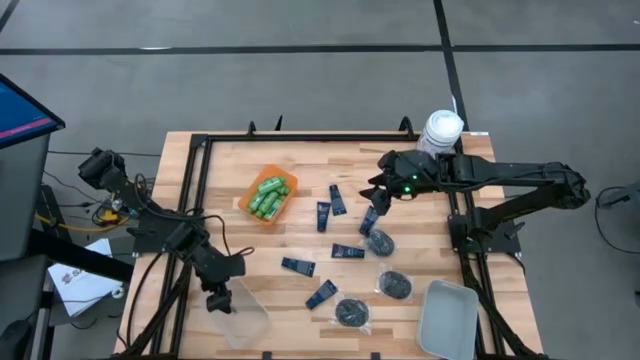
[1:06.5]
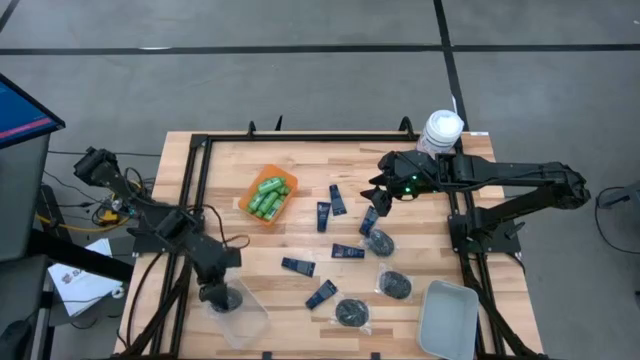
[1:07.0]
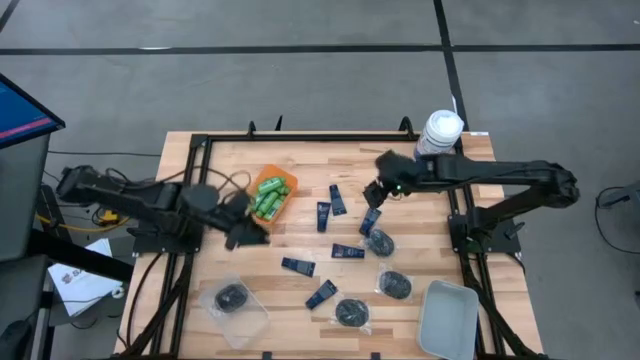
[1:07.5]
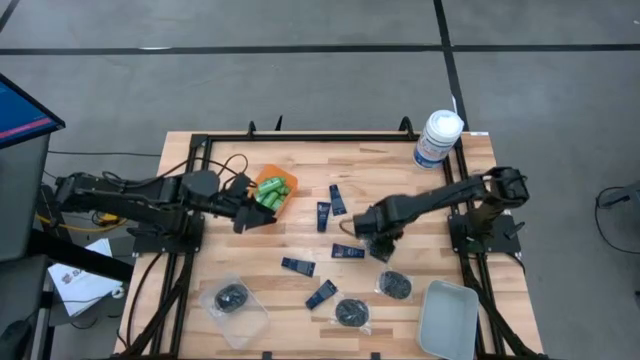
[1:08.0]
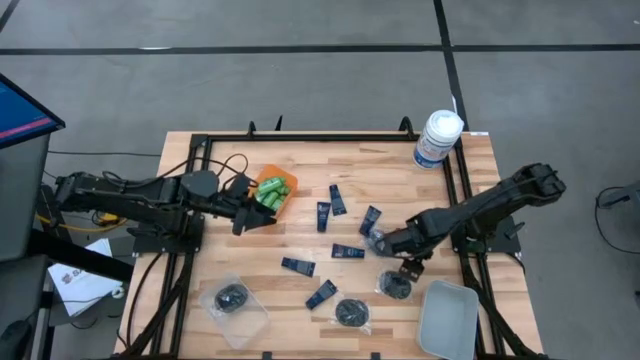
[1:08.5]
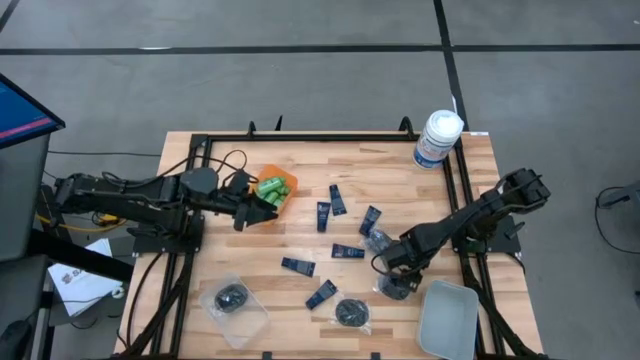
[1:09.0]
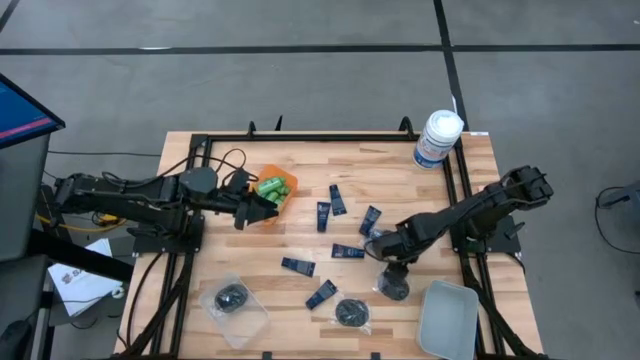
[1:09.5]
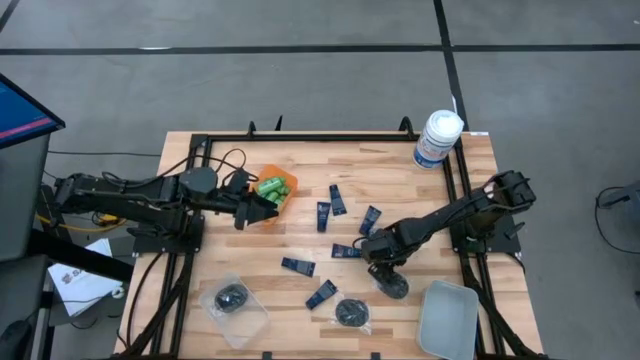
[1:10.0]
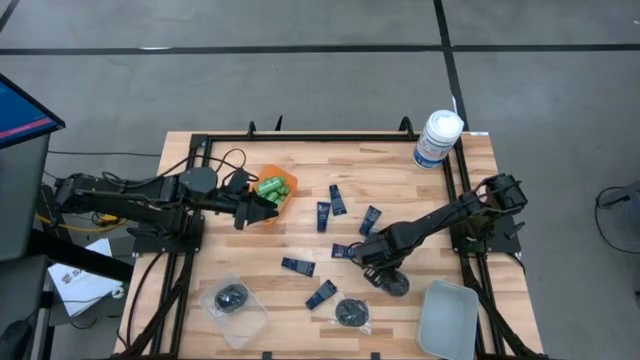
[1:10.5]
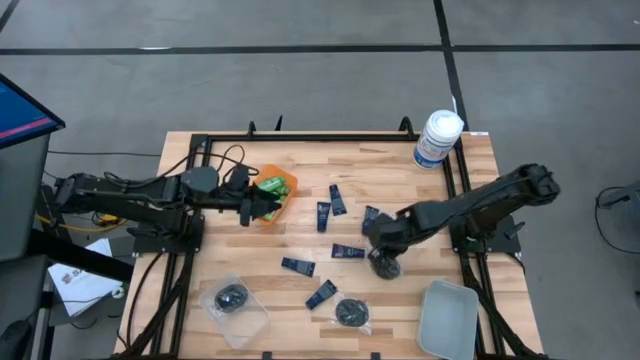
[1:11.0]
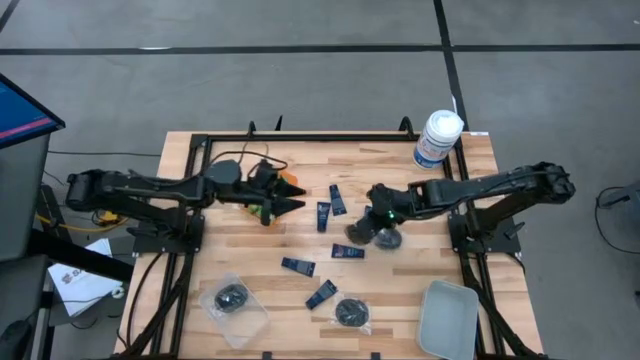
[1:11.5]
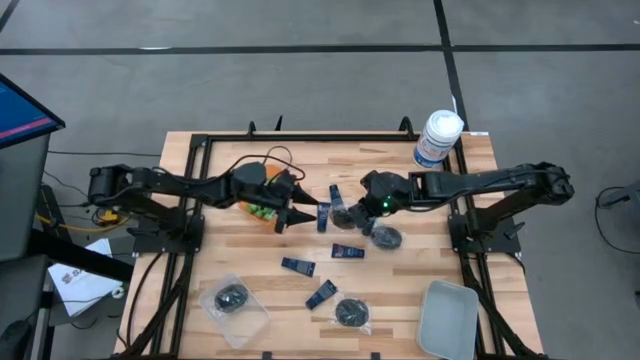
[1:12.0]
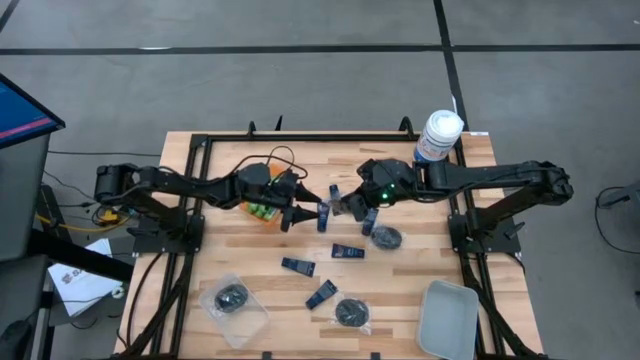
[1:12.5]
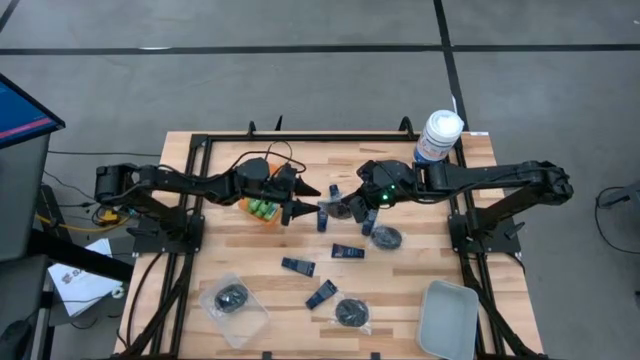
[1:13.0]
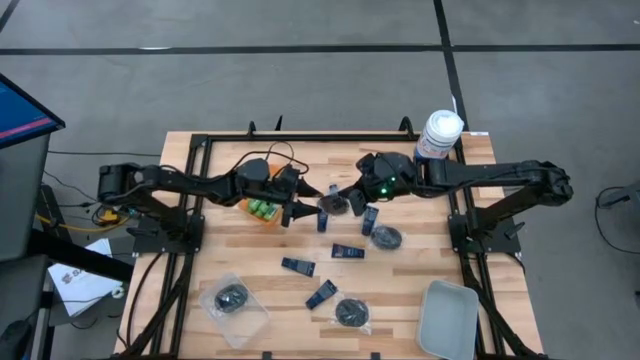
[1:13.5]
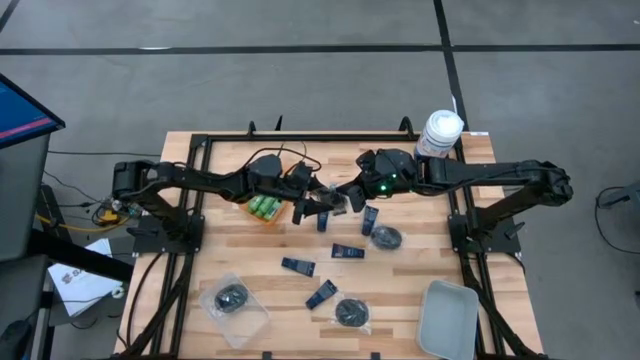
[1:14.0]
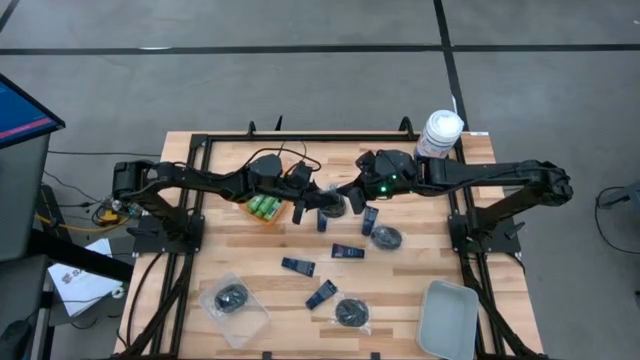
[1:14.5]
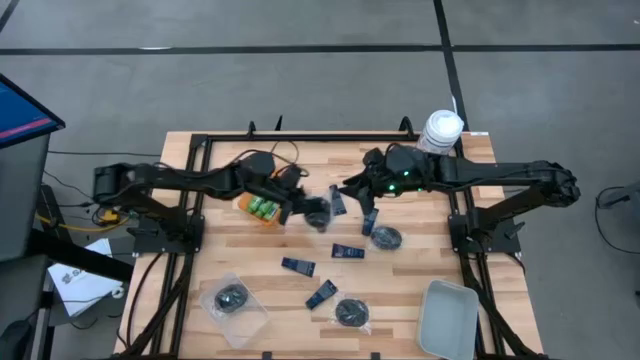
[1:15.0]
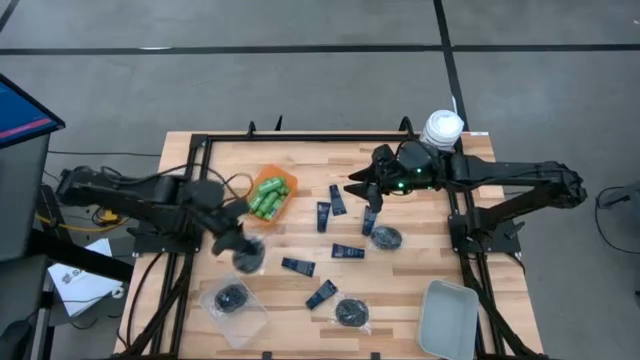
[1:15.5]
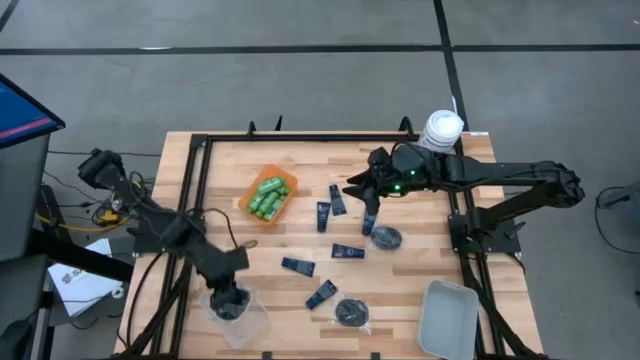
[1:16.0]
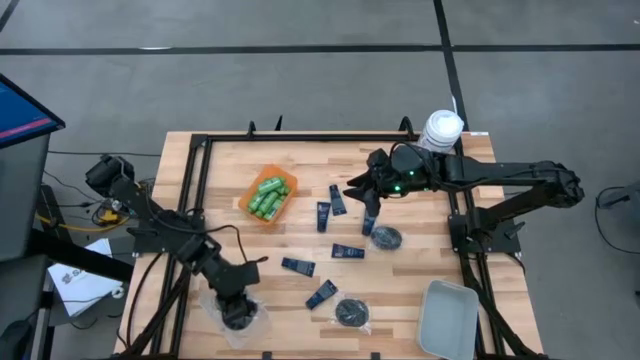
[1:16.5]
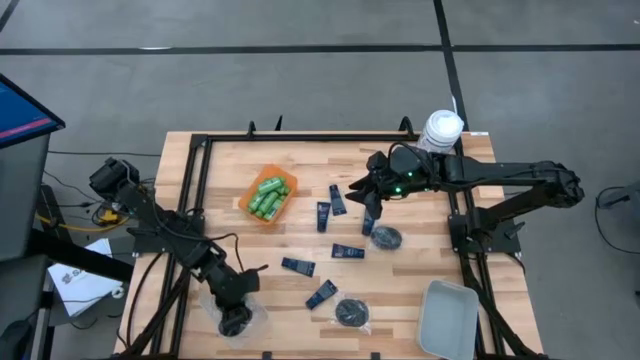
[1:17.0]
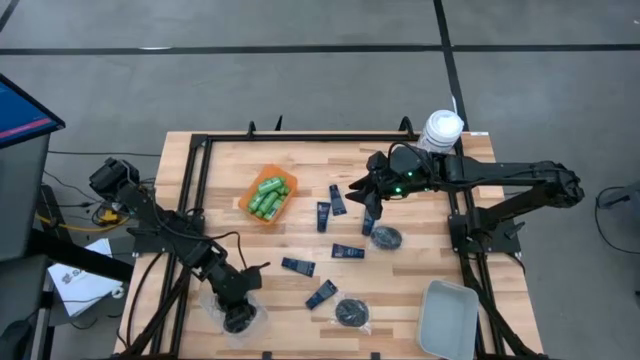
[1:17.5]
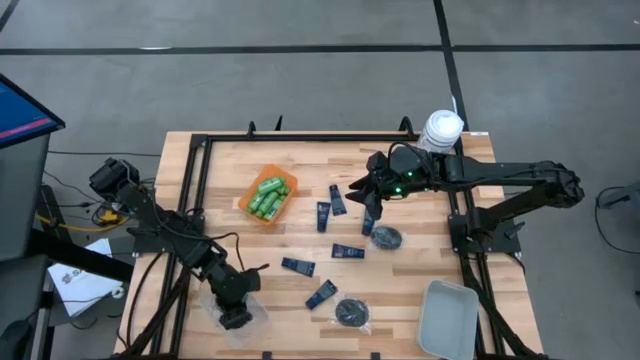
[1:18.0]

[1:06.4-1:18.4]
Task: Pick & Place Travel size toiletries
Put the black hairbrush into the transparent bin

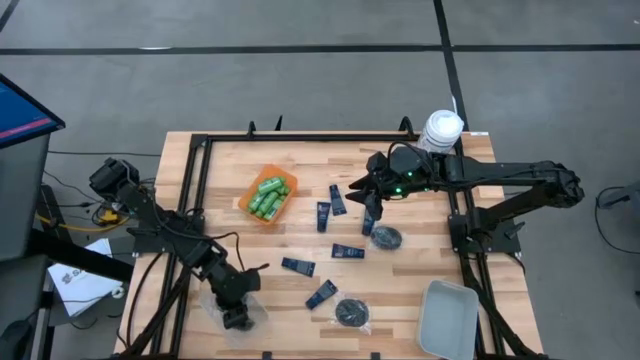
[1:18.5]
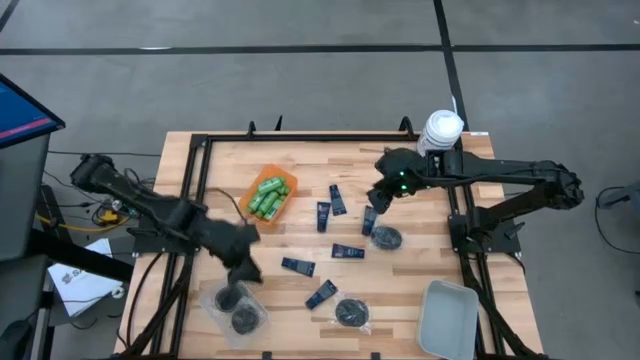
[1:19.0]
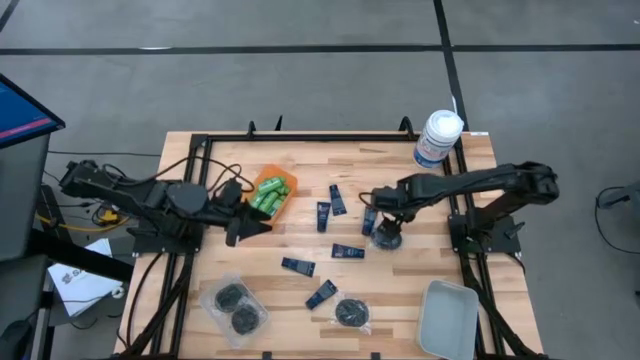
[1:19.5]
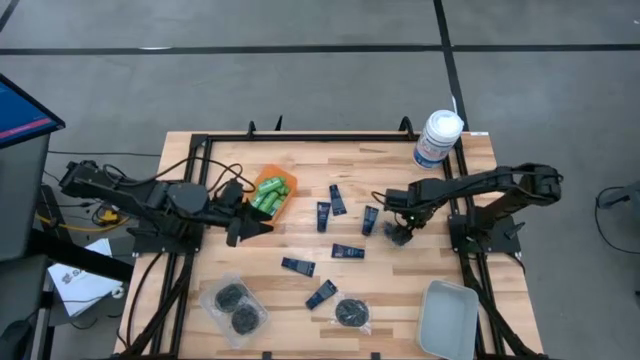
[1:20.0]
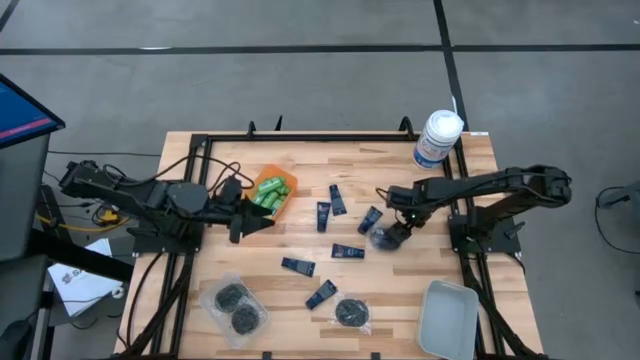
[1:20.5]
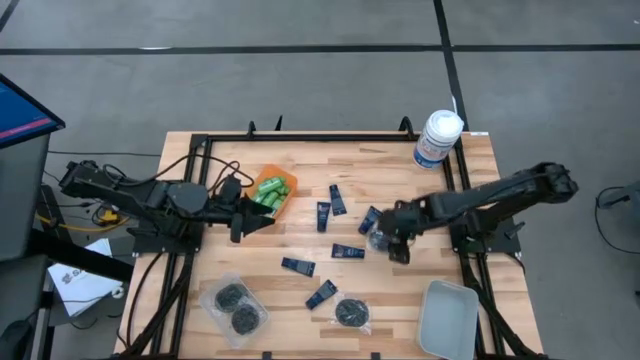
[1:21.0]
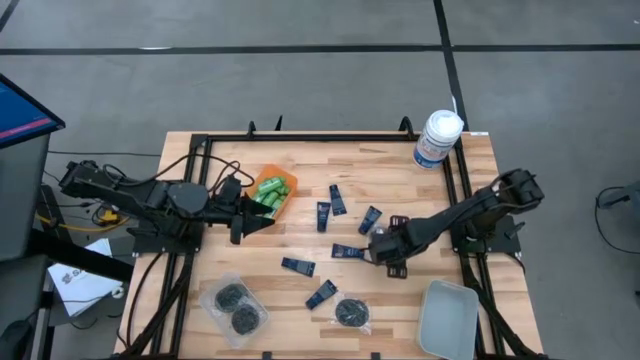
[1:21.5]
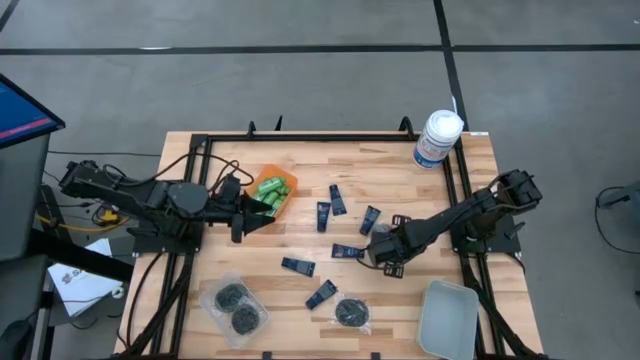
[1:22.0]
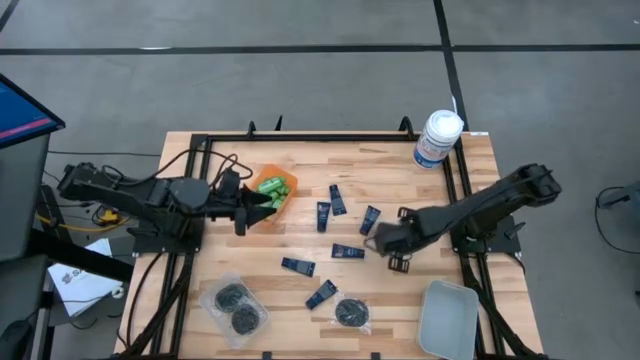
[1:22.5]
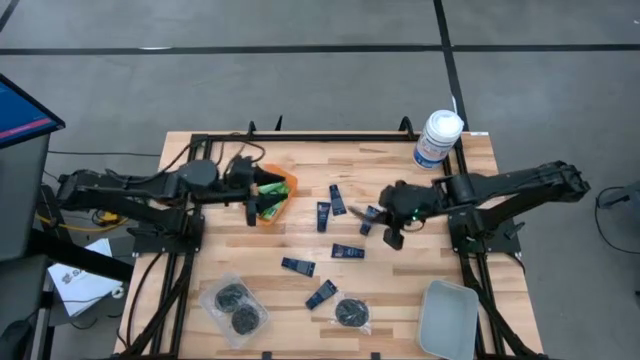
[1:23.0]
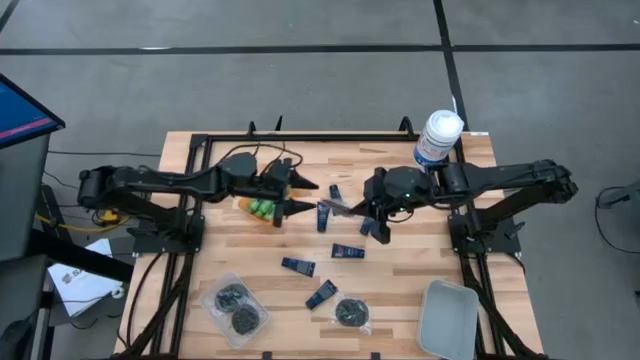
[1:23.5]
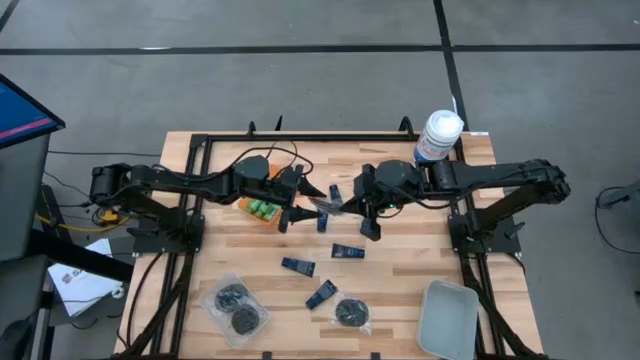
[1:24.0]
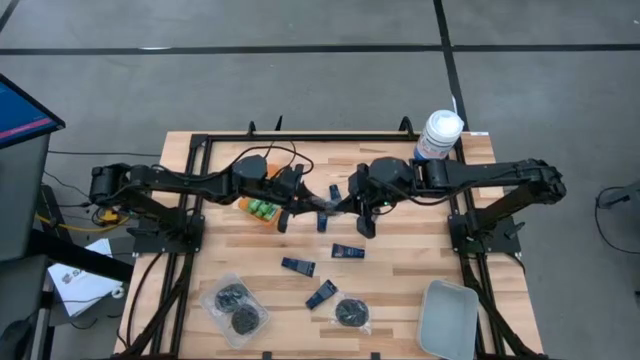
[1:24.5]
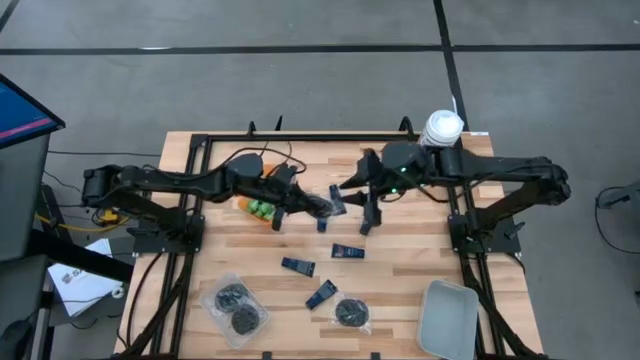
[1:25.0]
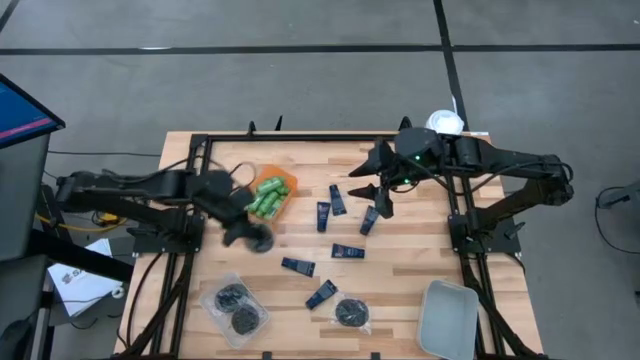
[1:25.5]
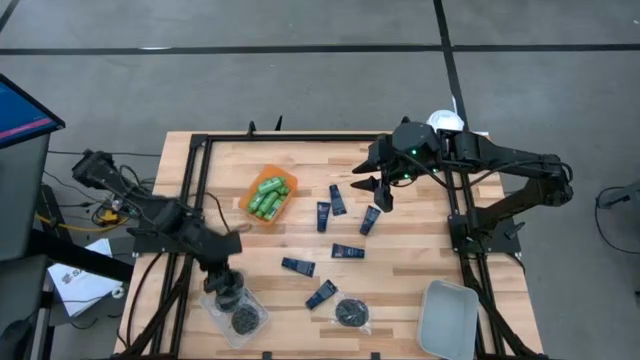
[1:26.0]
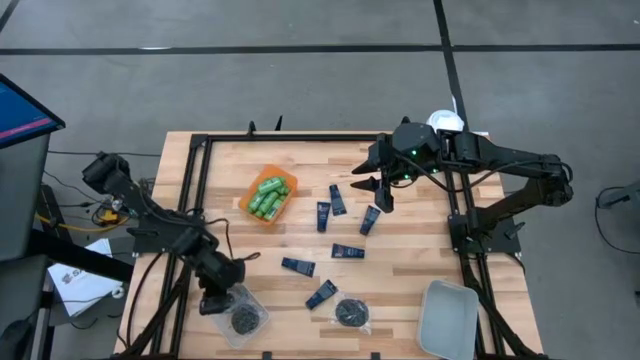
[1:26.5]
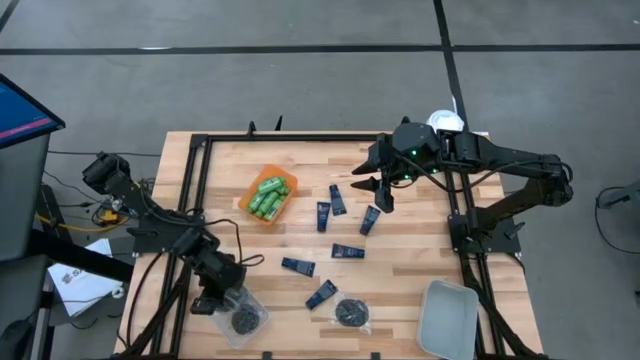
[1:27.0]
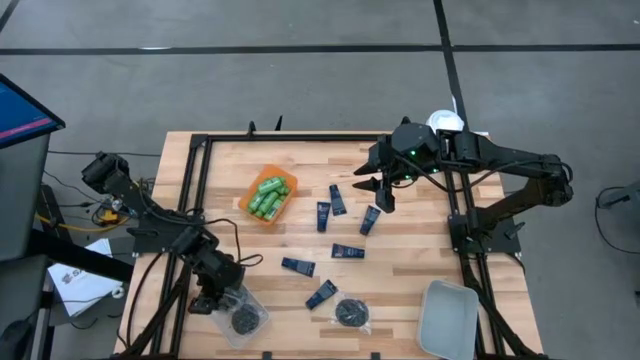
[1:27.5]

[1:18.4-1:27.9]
Put the black hairbrush into the transparent bin
